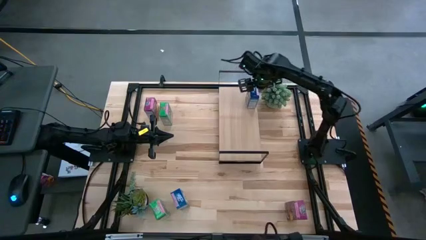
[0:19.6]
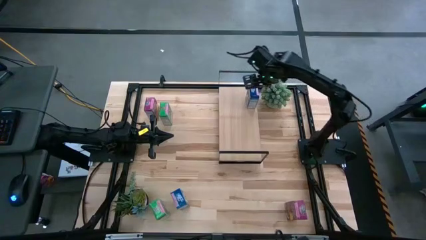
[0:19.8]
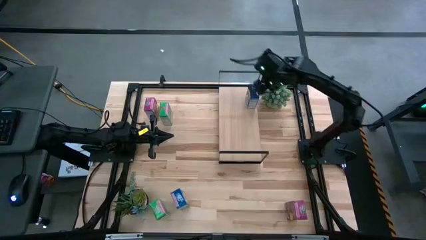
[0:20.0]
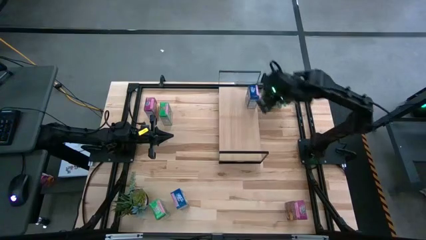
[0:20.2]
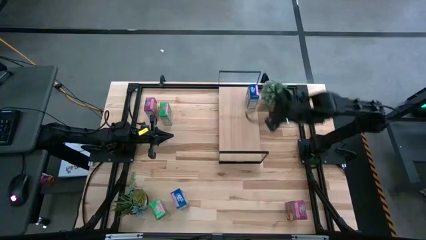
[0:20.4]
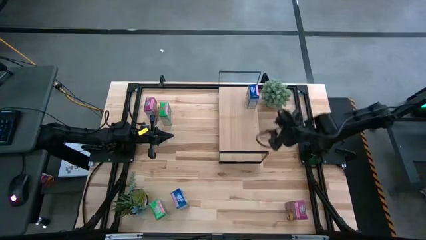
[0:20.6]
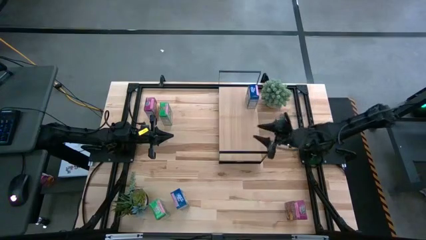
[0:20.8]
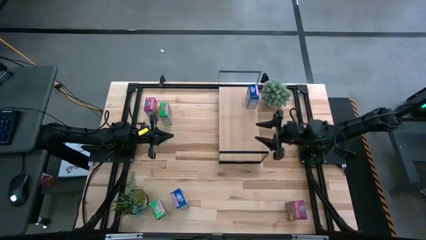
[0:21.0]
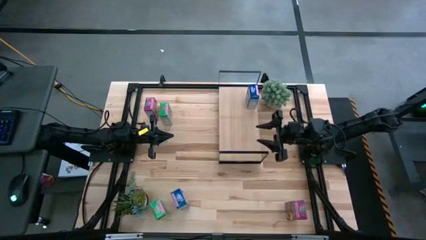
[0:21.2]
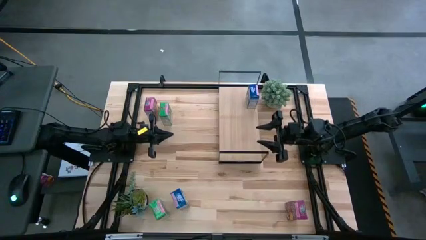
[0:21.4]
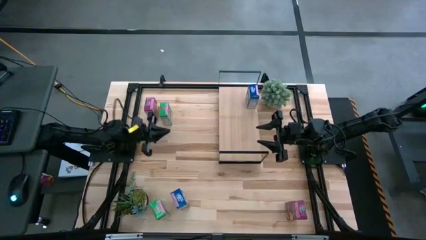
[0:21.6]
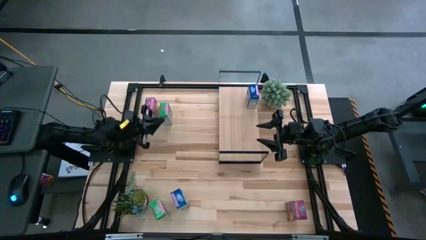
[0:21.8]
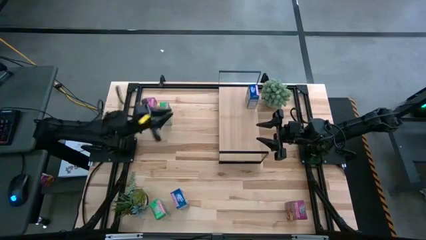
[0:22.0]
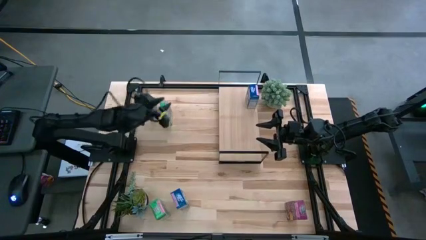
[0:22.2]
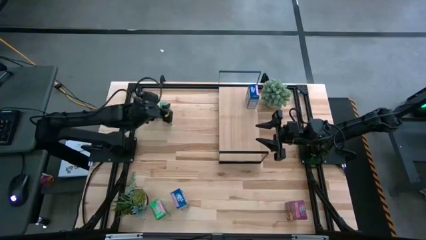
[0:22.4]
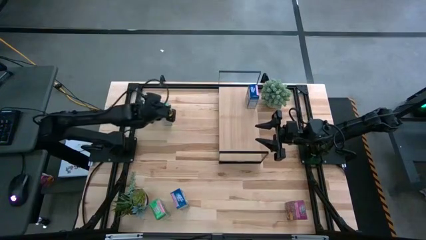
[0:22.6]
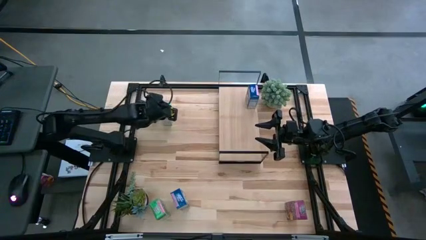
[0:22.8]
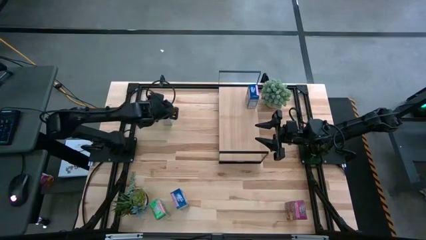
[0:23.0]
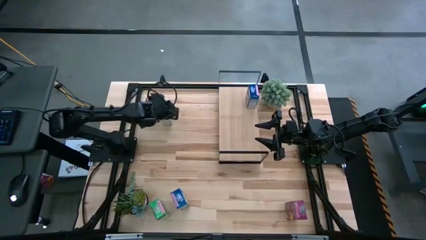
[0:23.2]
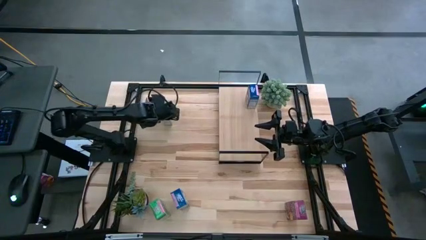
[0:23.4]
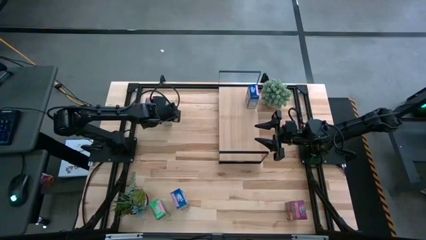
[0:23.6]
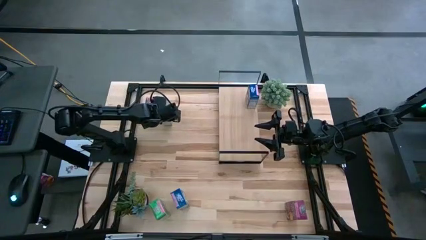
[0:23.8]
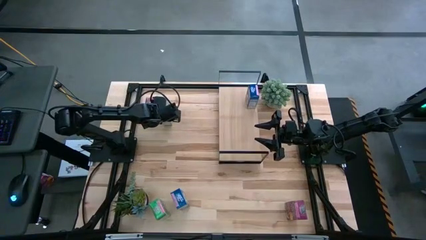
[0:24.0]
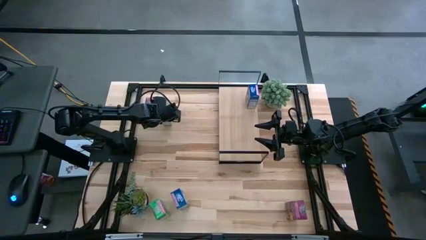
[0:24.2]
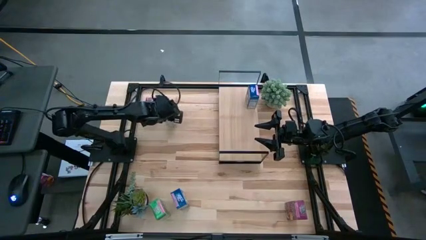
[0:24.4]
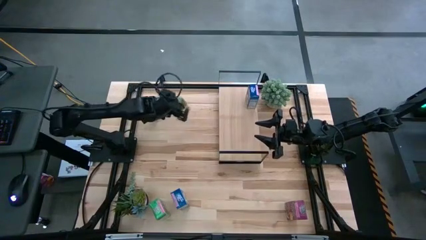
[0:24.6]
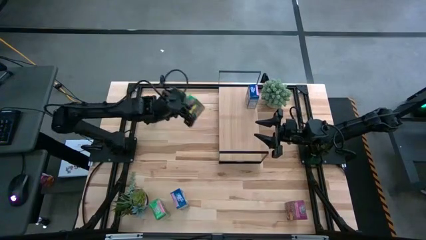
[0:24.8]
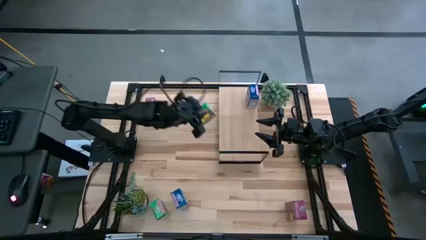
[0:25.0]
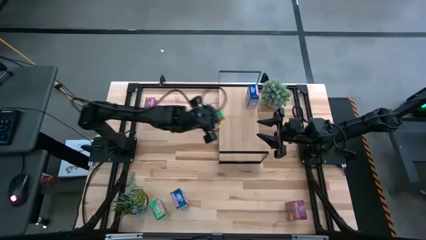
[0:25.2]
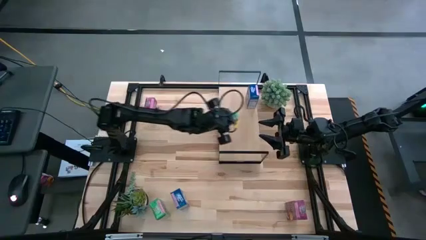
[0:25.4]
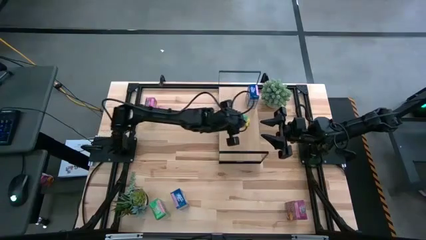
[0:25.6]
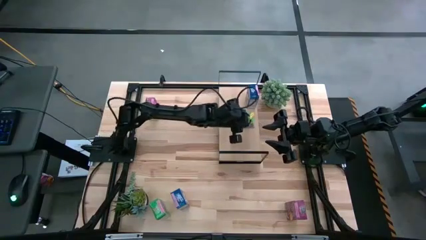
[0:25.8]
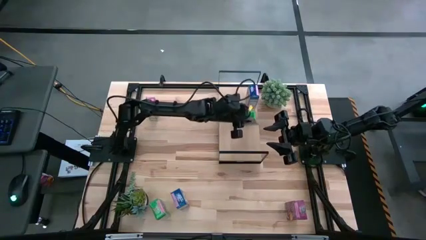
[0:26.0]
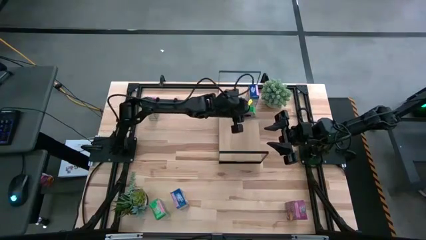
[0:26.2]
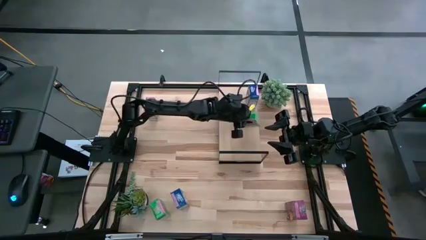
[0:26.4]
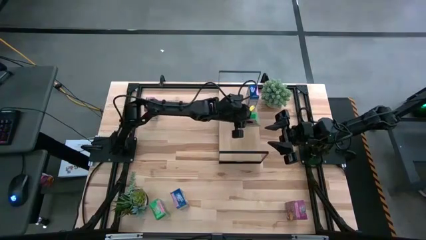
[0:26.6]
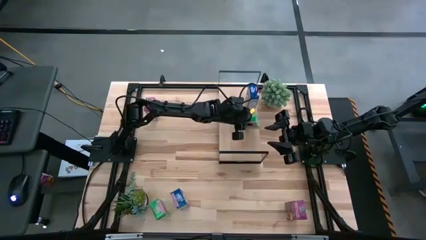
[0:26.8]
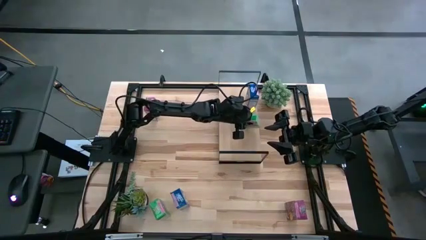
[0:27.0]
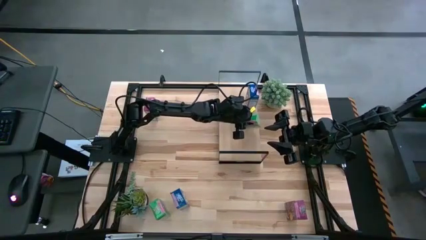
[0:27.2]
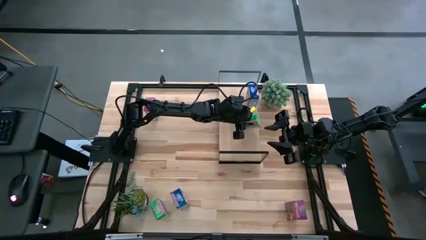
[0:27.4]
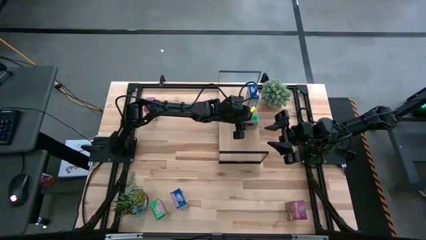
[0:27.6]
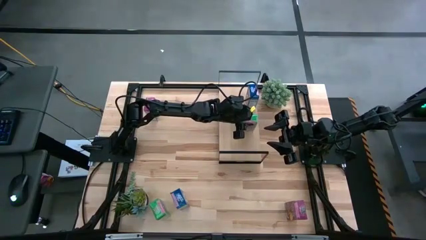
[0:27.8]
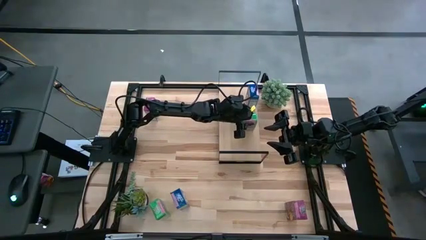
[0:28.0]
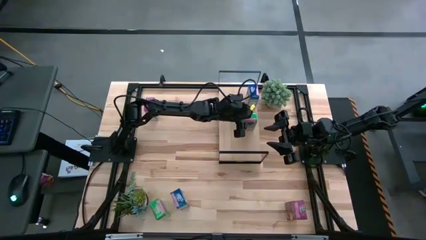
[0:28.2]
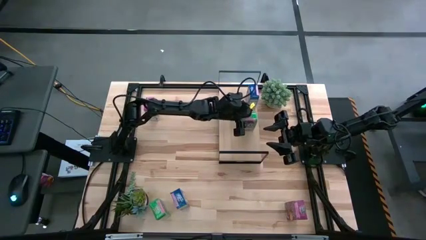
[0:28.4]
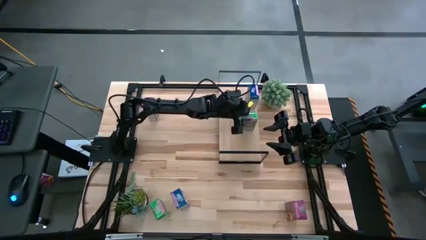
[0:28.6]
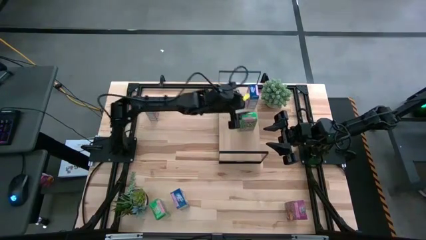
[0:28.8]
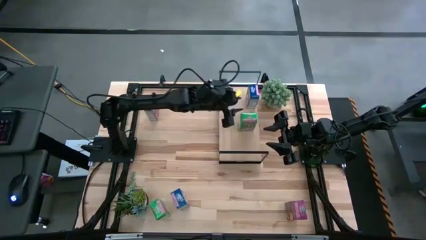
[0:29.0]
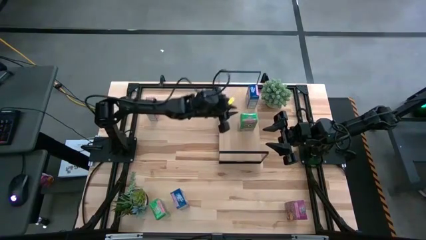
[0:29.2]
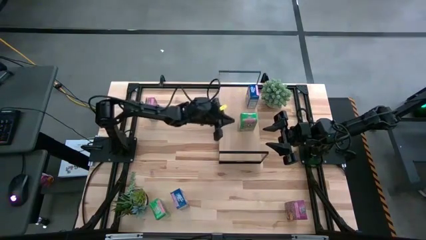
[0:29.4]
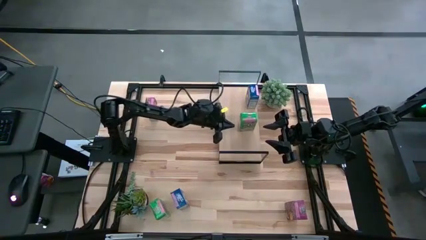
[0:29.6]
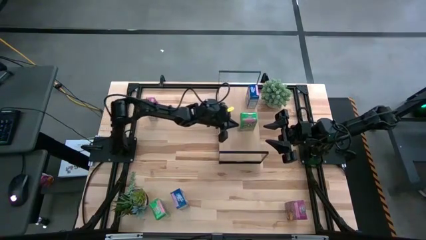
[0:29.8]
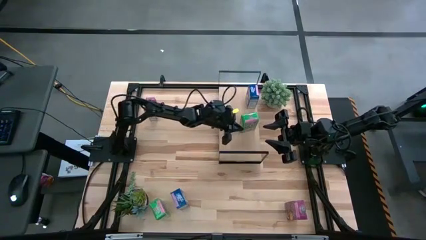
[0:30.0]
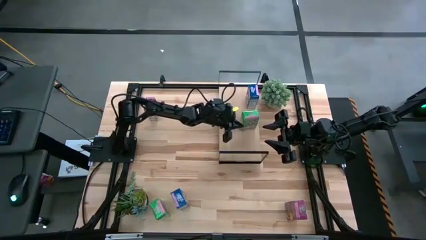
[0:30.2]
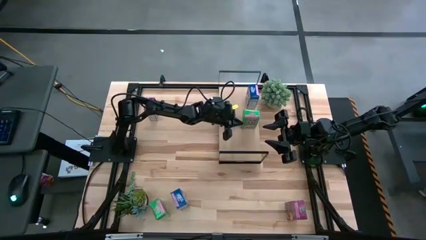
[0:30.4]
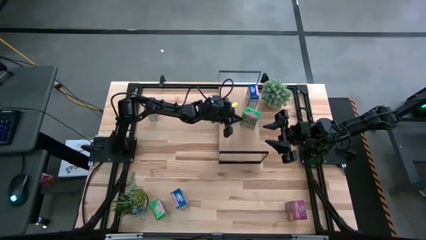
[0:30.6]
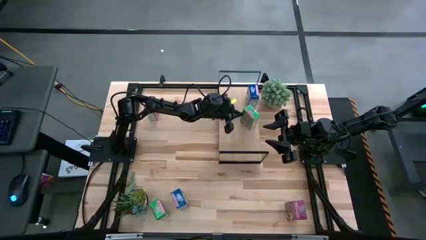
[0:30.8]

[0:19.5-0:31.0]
Task: Stack cereal on shelf
Put the top green cereal box on the shelf

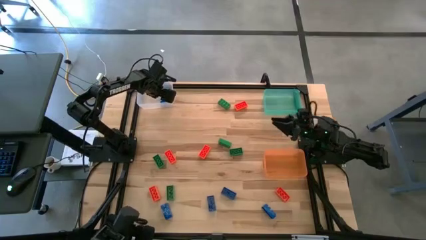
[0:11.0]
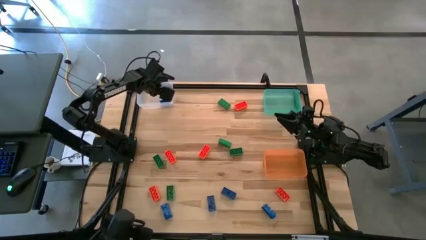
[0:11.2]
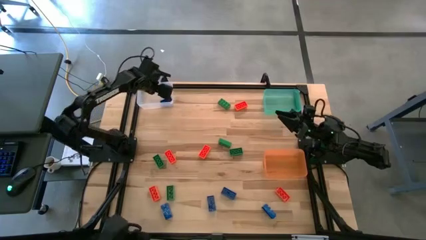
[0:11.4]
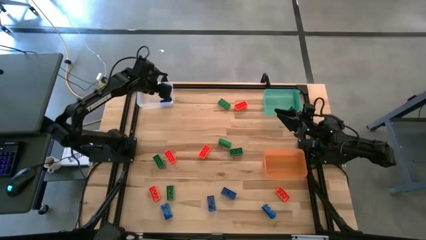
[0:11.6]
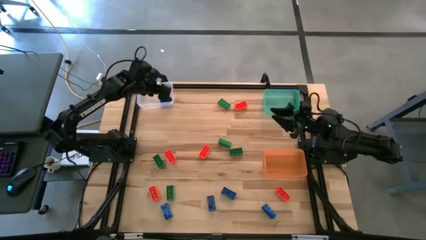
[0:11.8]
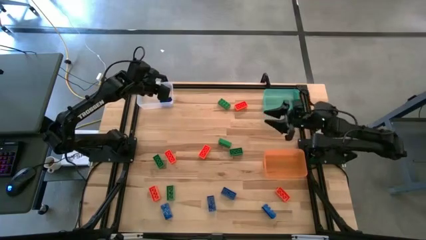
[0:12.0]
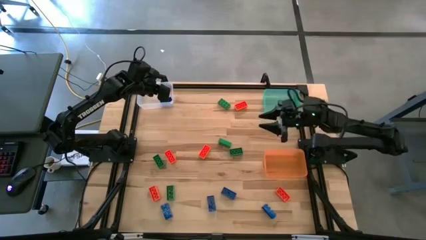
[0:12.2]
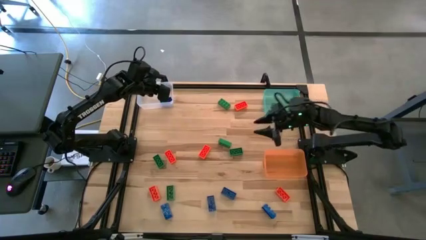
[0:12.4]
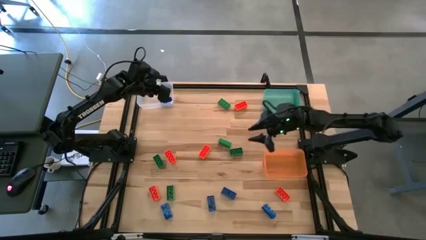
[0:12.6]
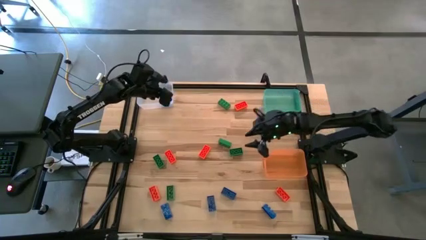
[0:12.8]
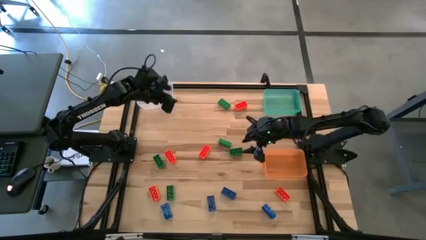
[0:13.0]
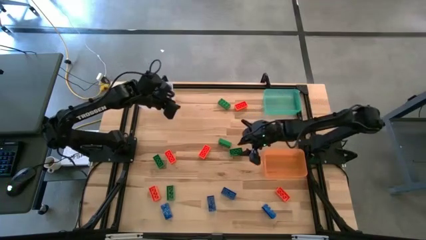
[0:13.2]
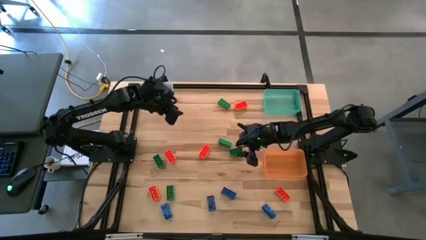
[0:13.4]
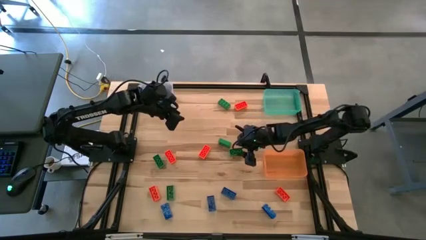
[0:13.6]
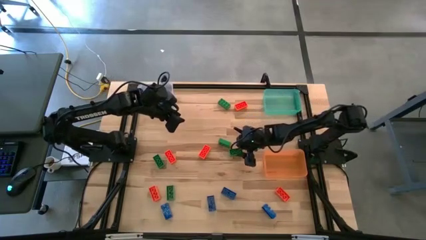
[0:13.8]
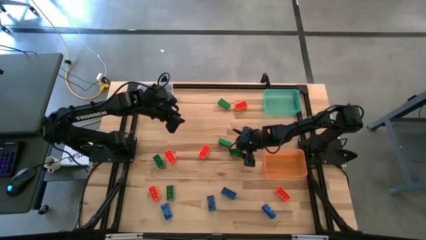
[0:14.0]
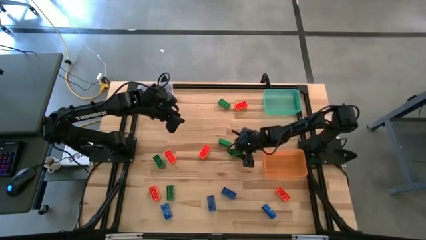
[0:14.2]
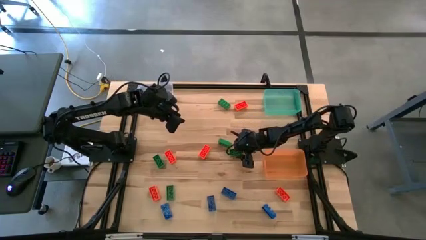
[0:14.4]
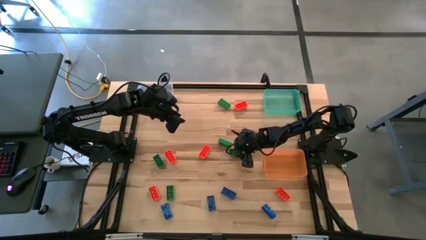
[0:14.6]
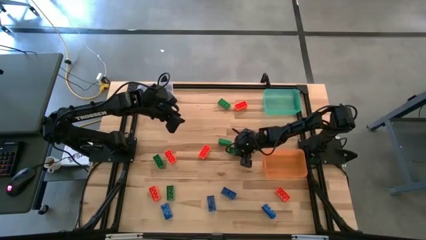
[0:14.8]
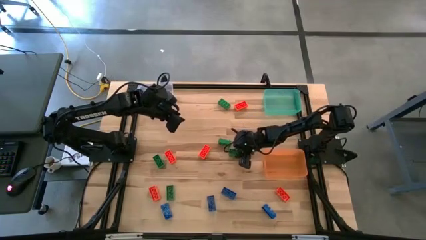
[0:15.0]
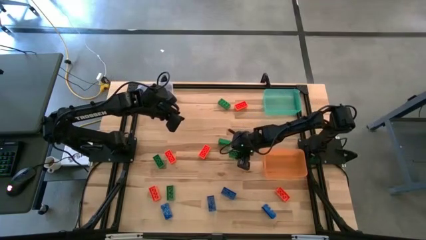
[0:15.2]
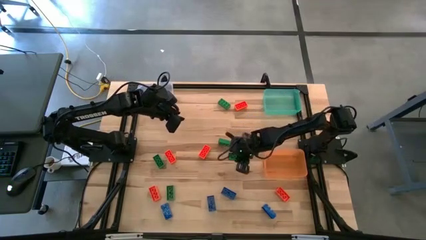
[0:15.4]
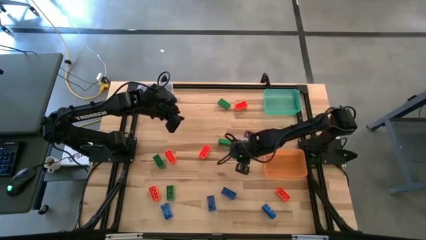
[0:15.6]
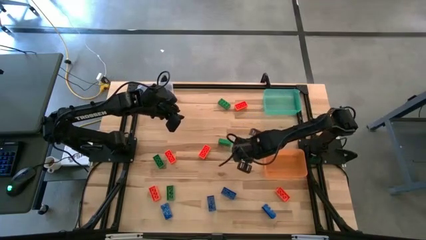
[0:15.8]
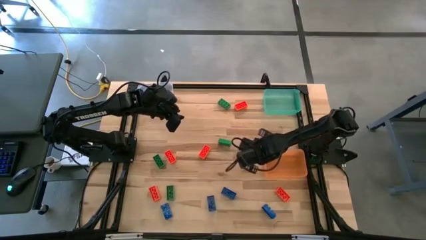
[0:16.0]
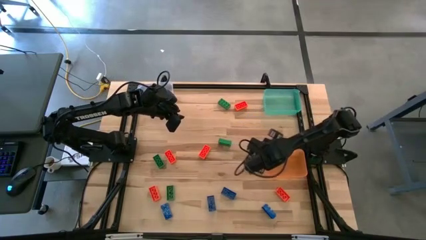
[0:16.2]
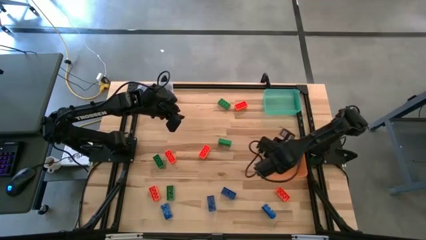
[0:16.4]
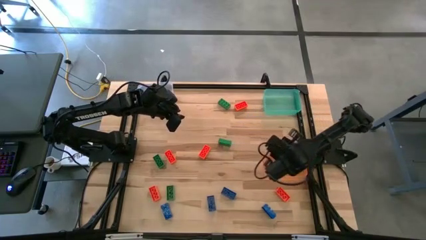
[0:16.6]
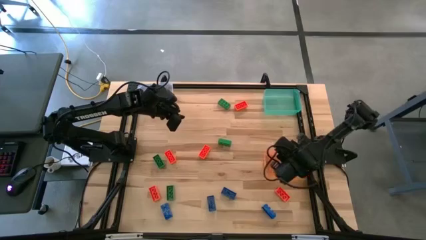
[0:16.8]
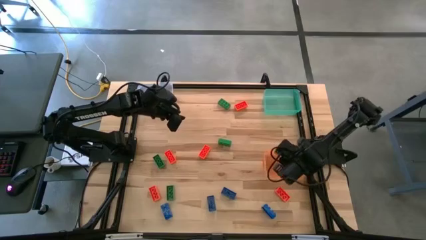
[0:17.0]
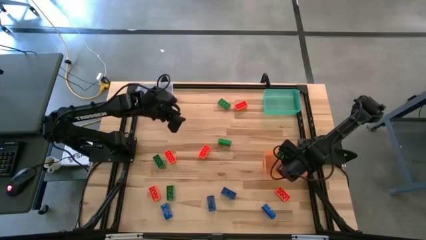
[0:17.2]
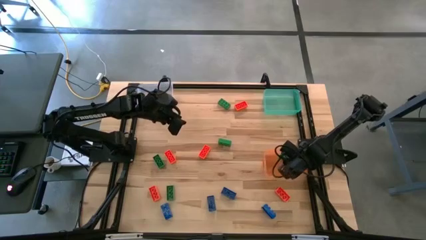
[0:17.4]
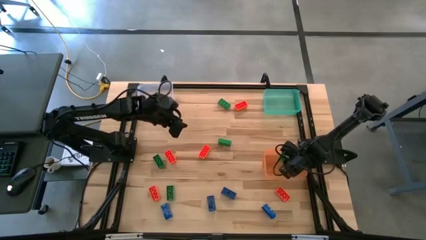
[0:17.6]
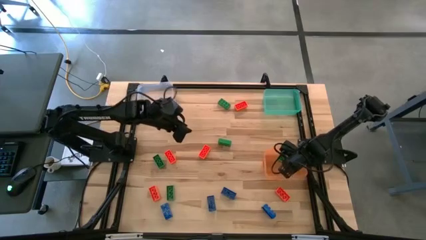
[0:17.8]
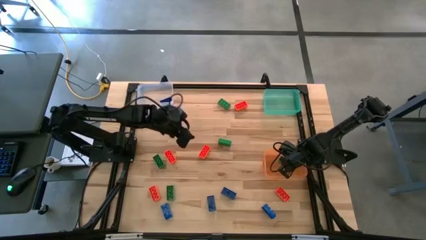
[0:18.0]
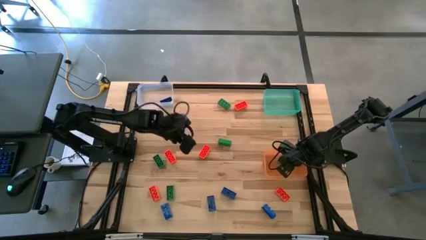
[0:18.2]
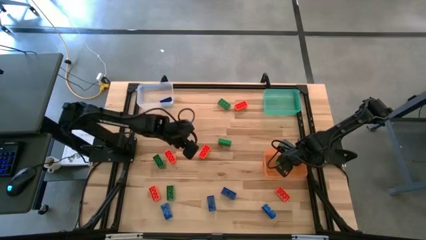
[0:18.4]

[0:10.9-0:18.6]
Task: Sort & place blocks by color
Put the green game piece into the orange bin
